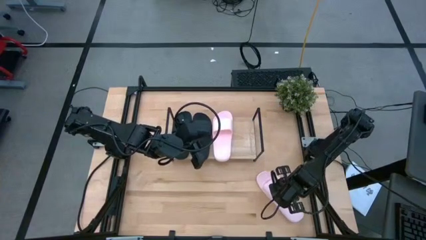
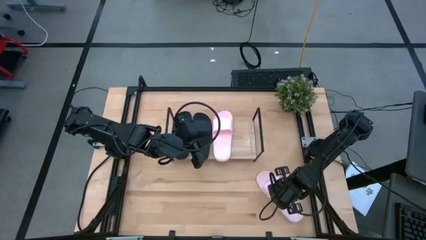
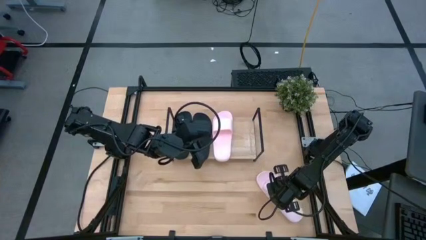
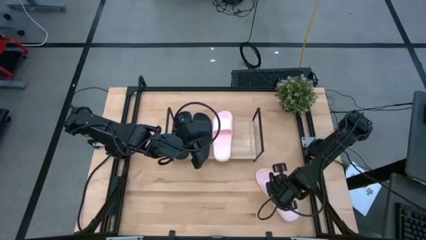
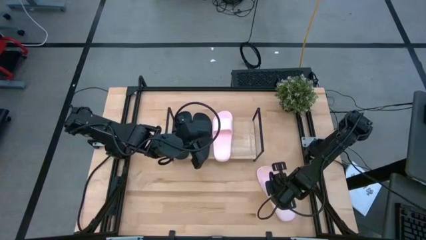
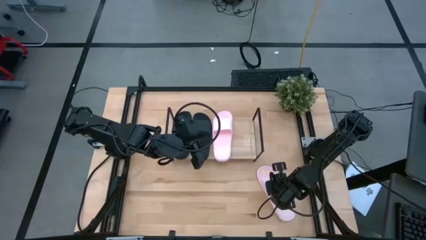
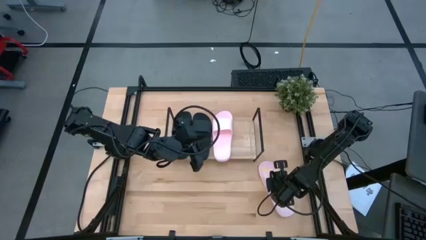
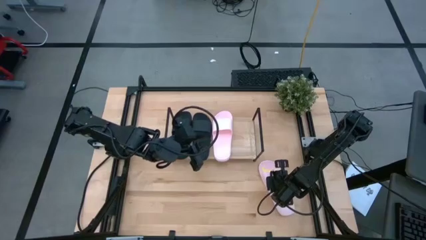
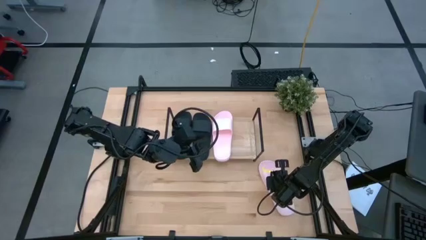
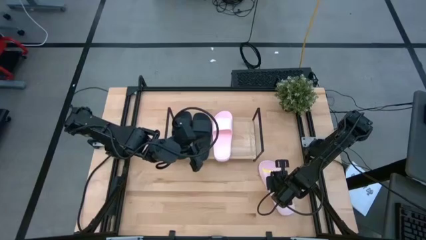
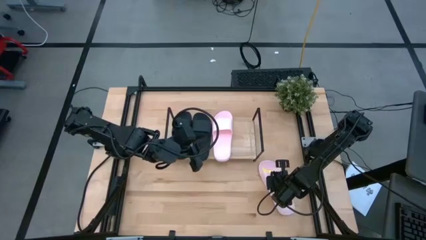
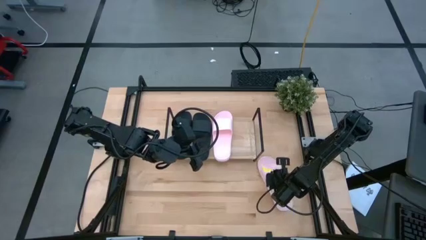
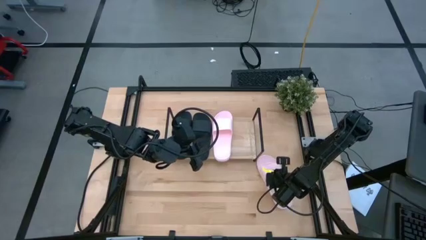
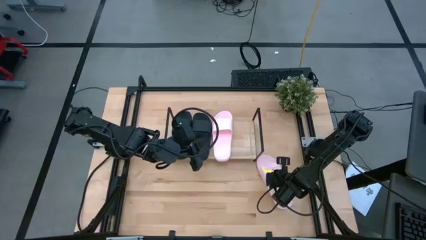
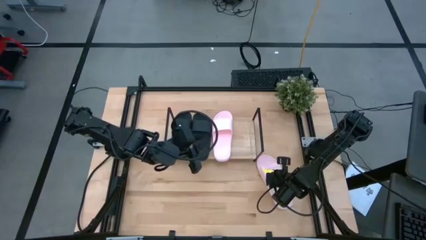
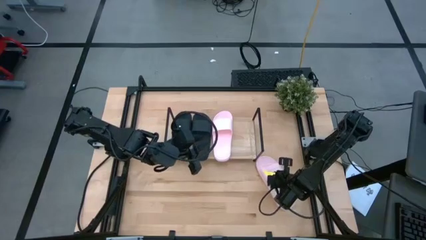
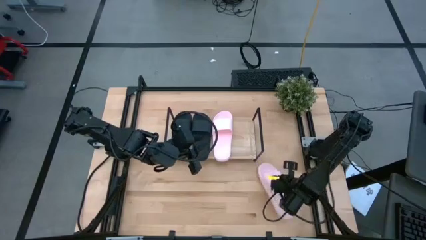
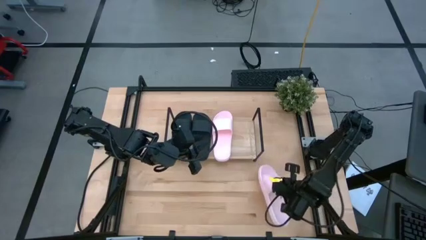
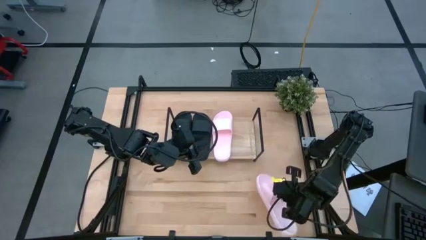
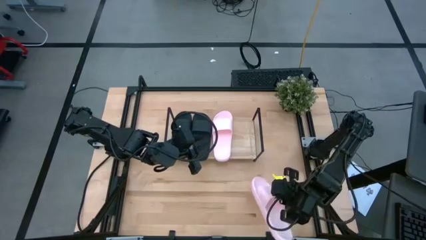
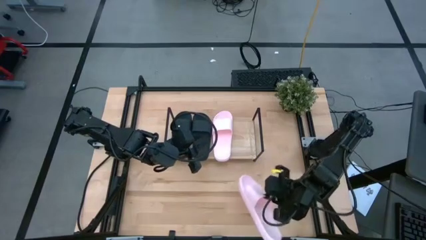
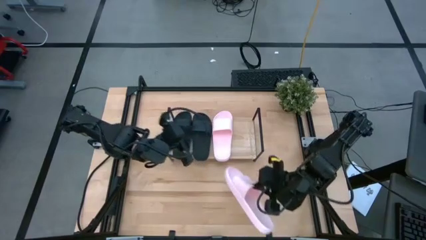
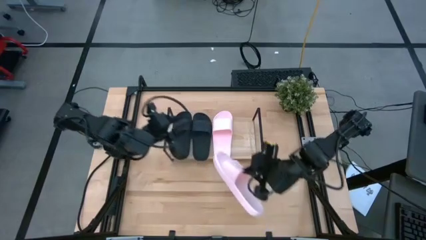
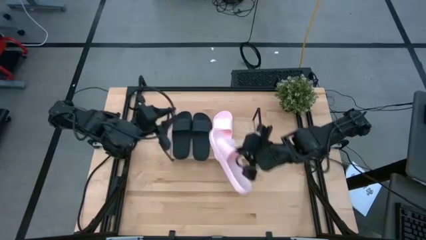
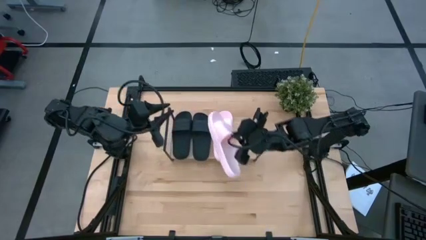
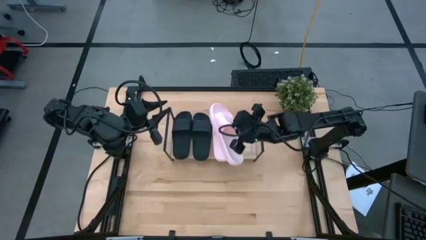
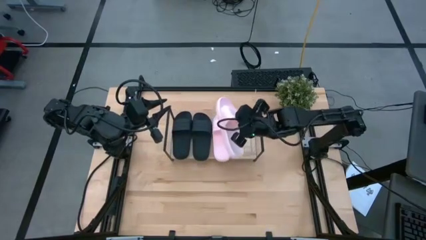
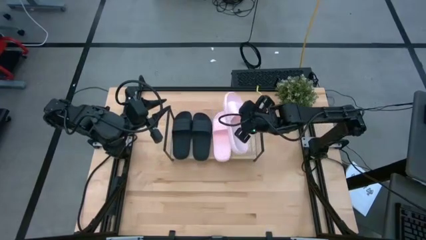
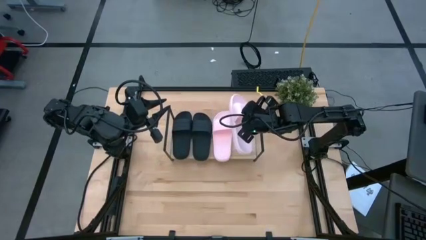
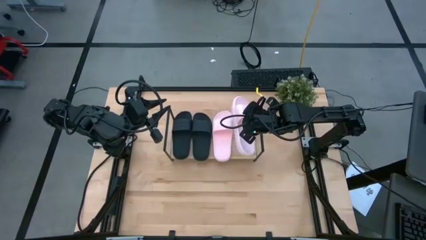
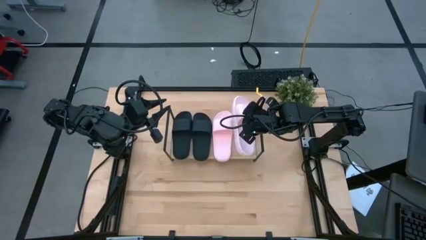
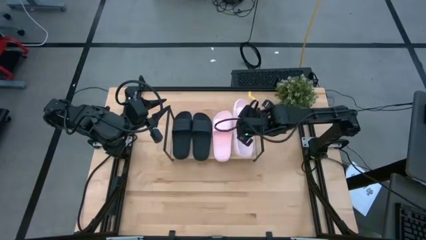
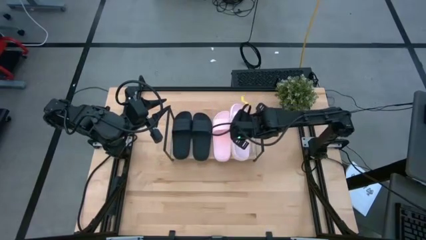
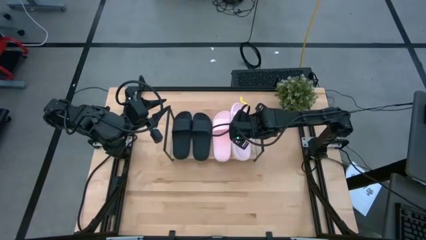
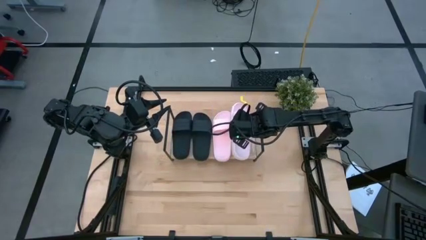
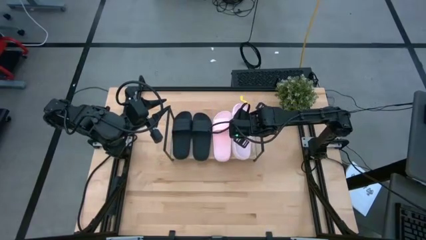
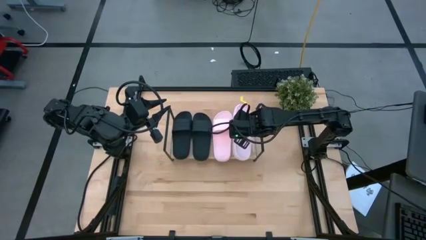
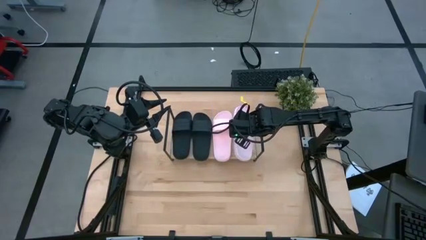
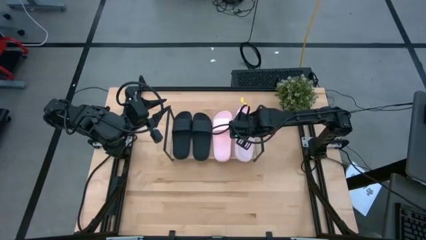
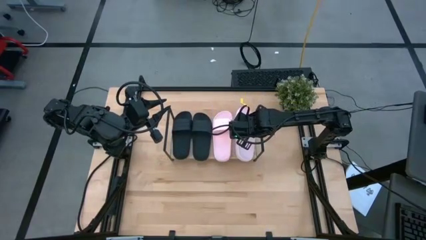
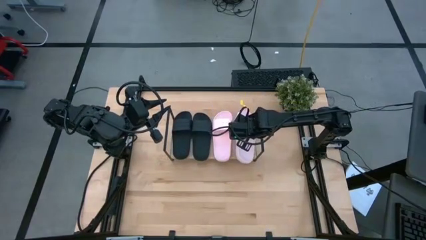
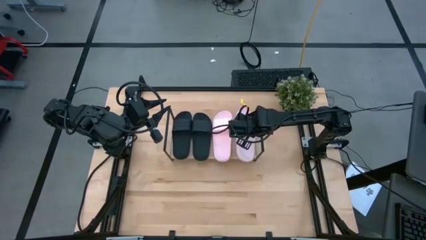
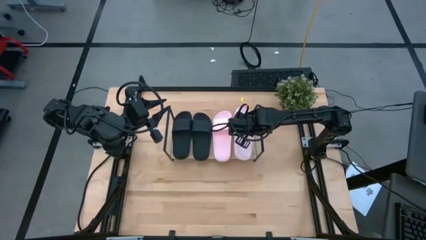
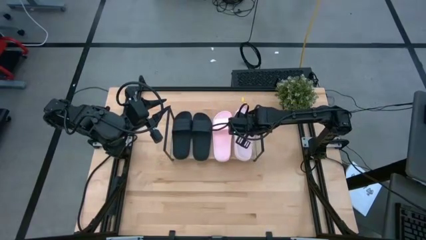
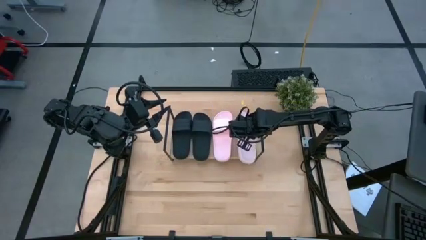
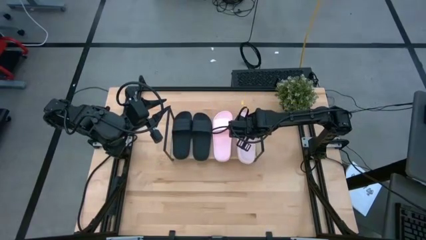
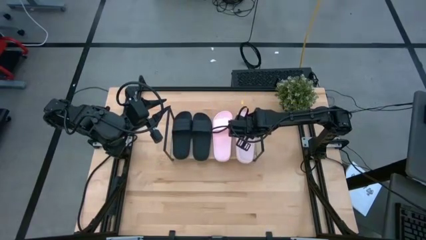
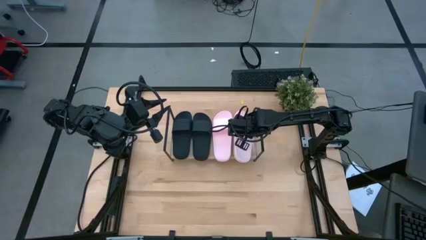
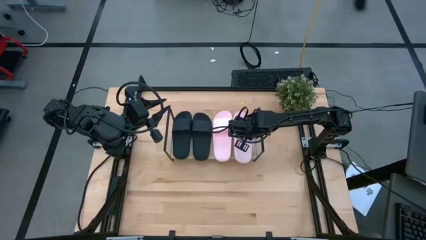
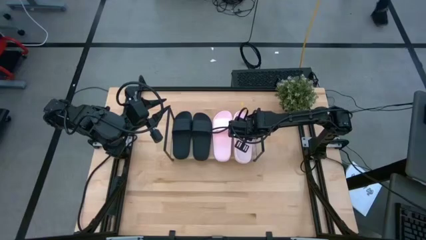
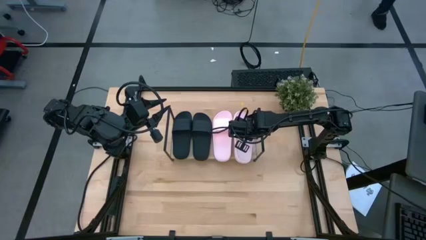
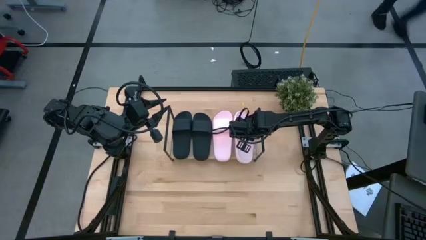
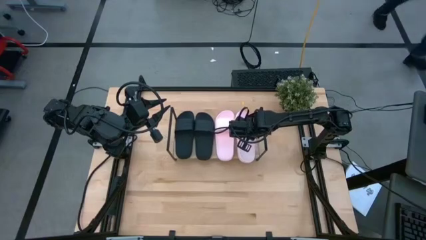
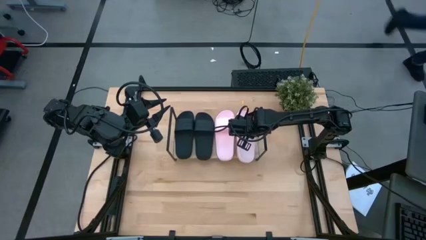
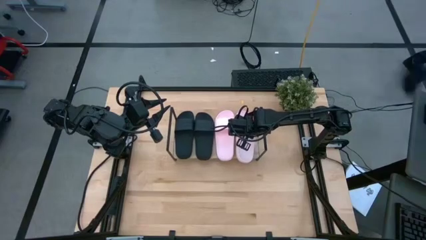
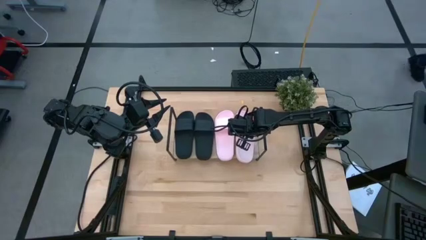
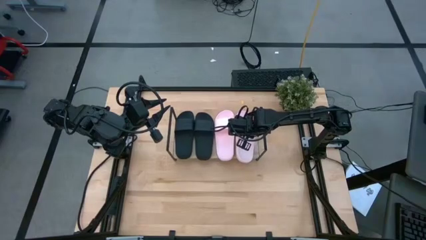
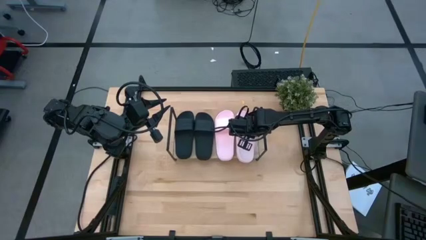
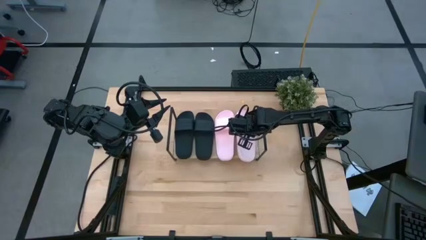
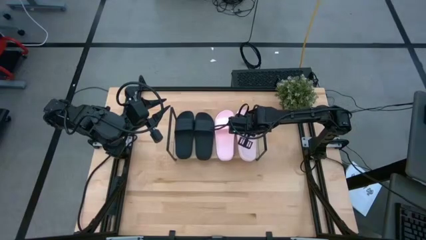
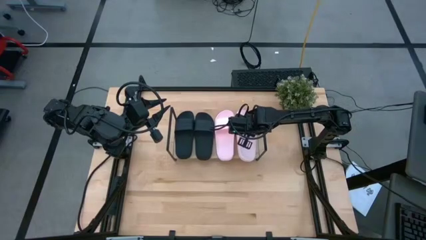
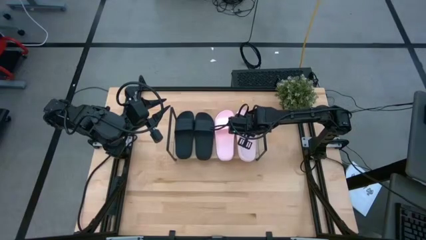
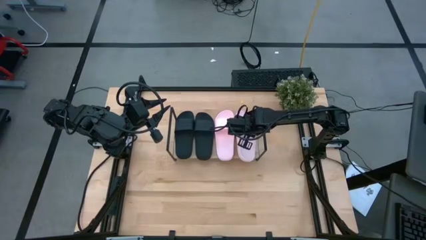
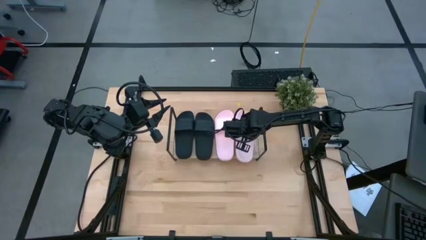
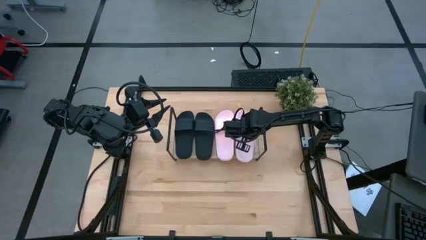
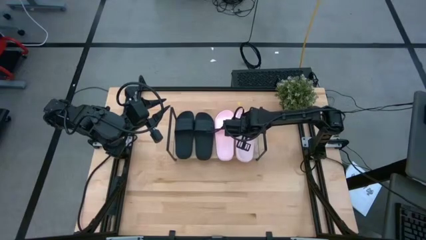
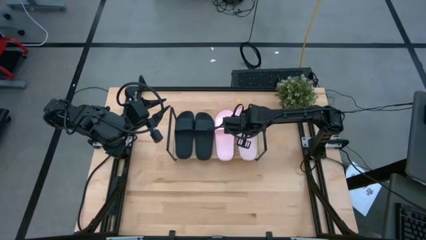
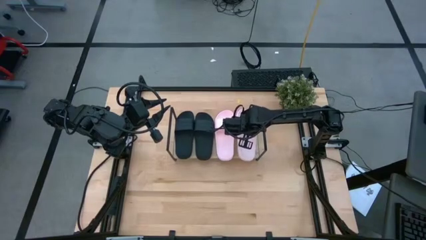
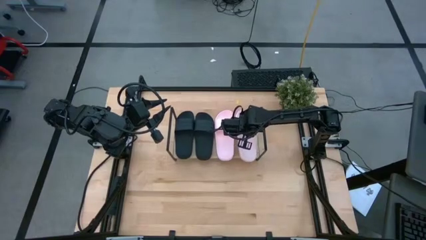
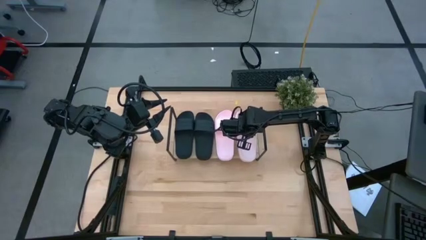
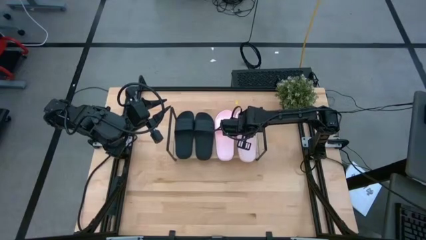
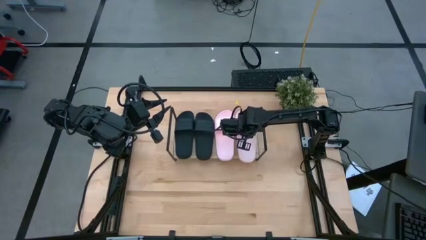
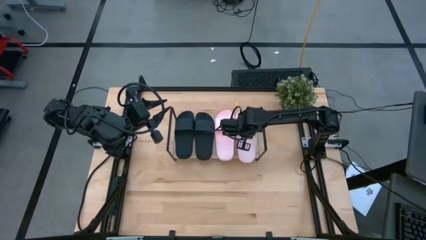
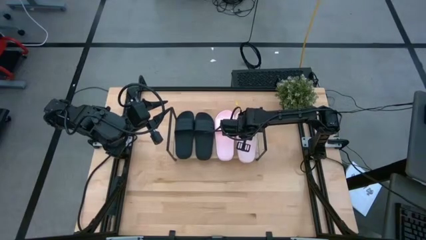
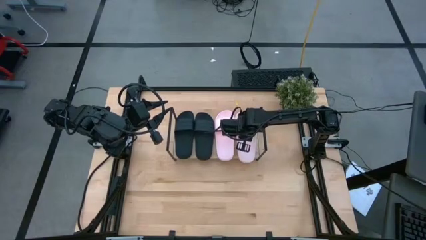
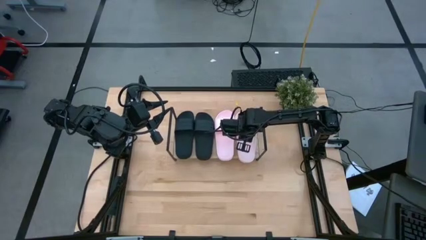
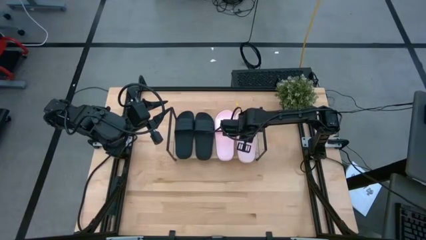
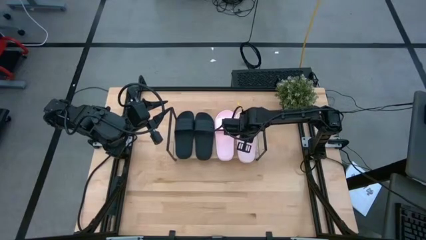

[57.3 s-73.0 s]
Task: Pick and place slides into the shelf
Put the pink slipper on the shelf
